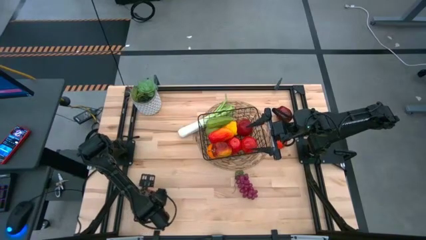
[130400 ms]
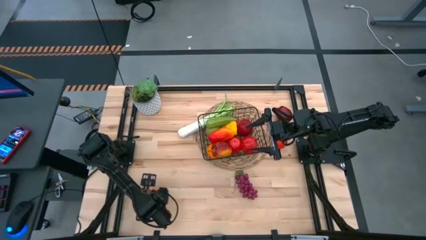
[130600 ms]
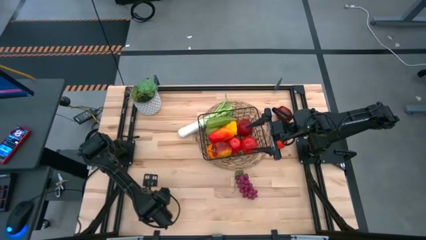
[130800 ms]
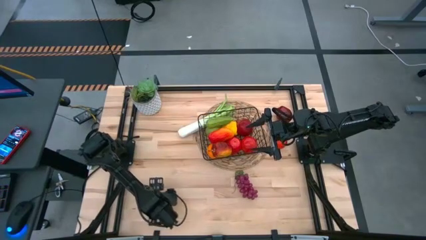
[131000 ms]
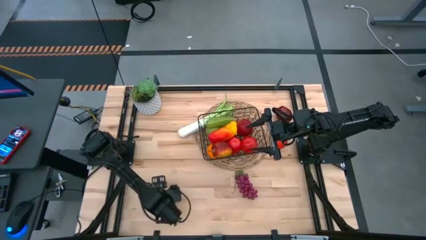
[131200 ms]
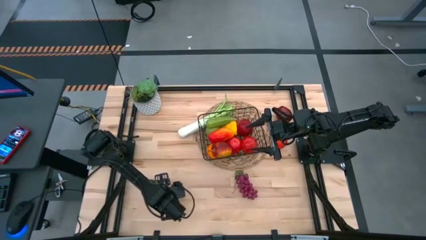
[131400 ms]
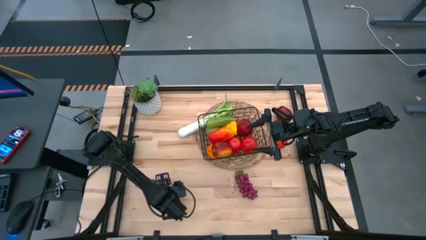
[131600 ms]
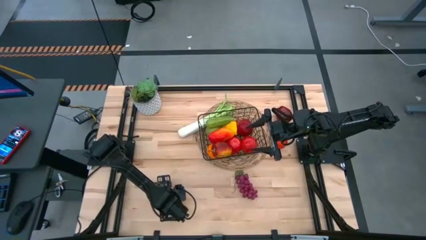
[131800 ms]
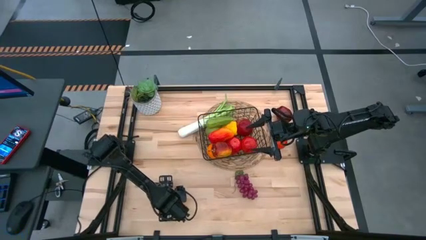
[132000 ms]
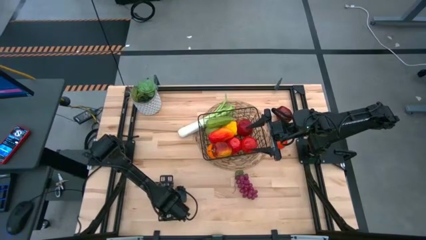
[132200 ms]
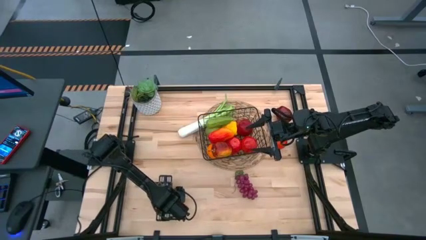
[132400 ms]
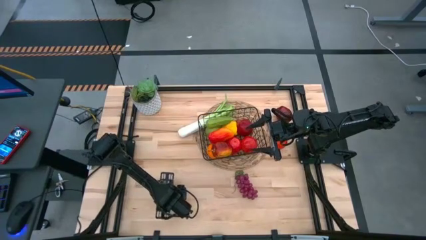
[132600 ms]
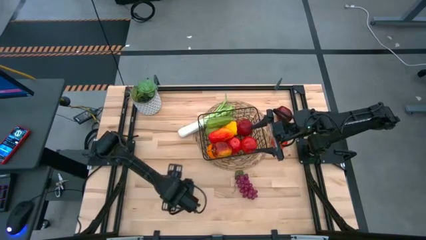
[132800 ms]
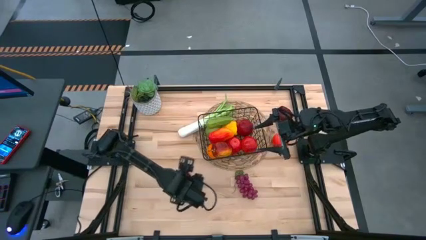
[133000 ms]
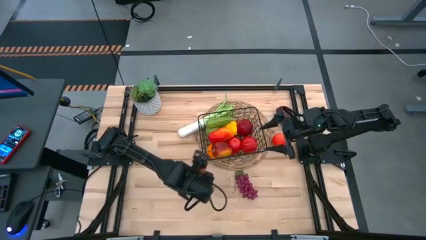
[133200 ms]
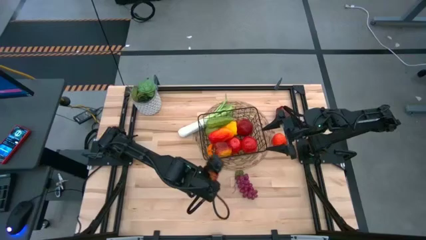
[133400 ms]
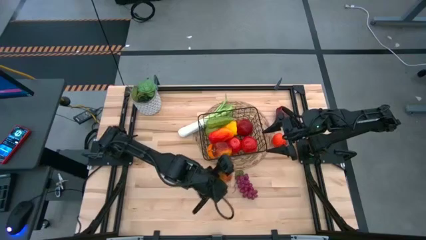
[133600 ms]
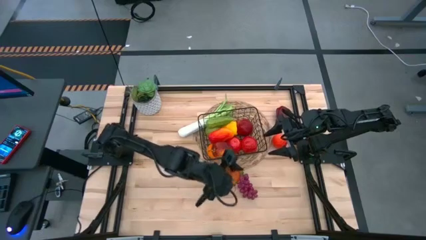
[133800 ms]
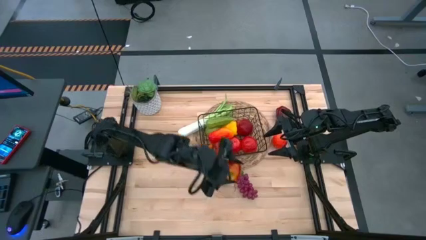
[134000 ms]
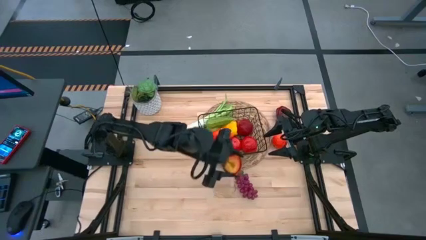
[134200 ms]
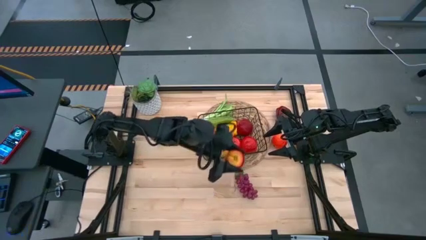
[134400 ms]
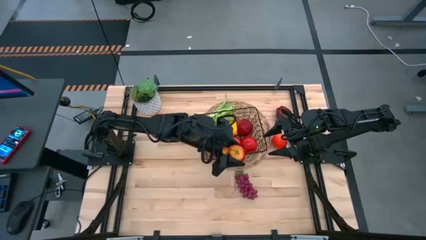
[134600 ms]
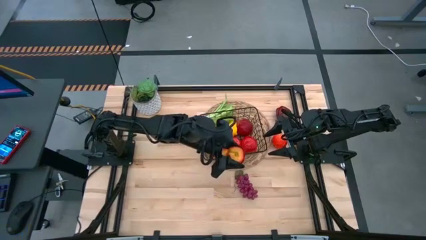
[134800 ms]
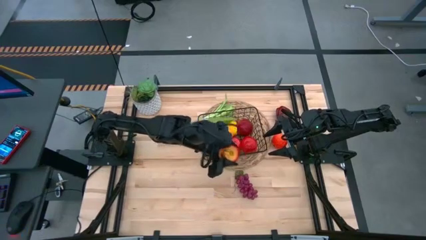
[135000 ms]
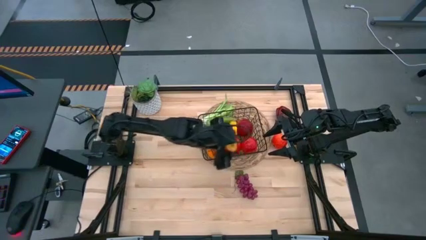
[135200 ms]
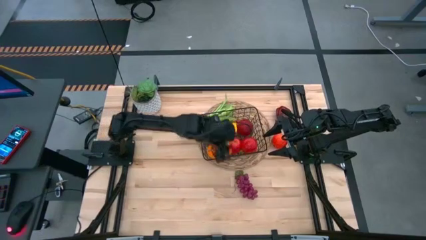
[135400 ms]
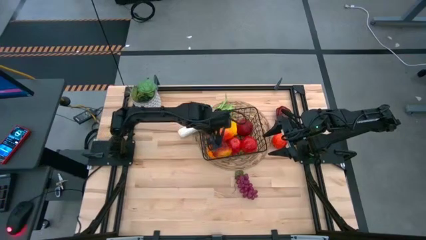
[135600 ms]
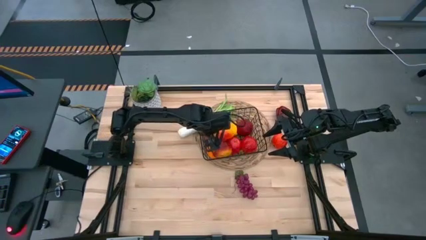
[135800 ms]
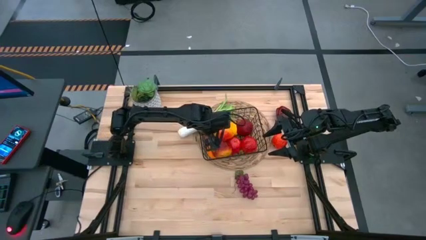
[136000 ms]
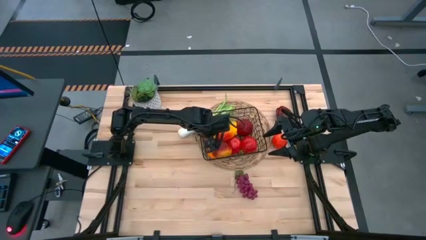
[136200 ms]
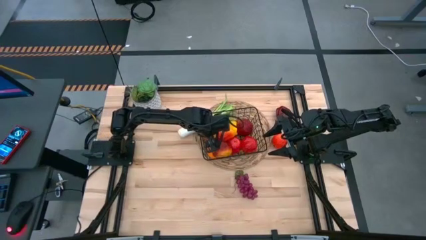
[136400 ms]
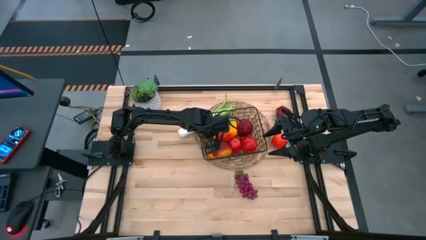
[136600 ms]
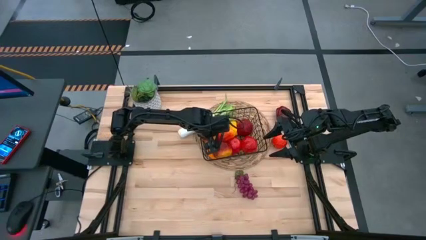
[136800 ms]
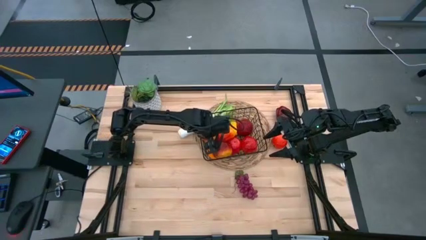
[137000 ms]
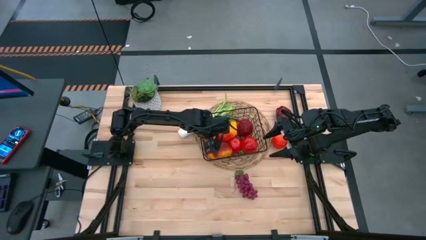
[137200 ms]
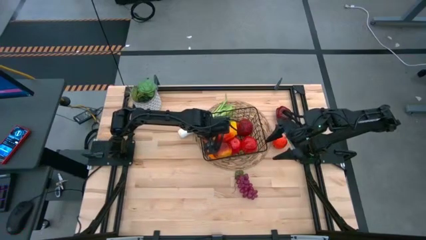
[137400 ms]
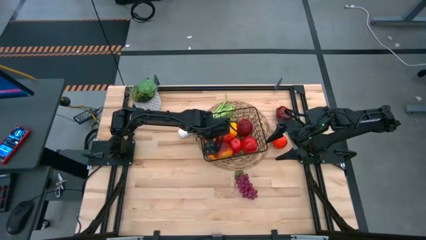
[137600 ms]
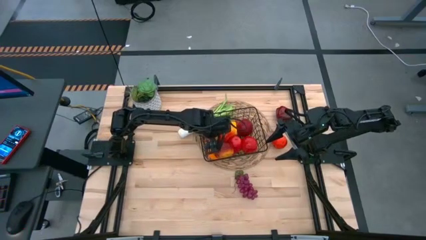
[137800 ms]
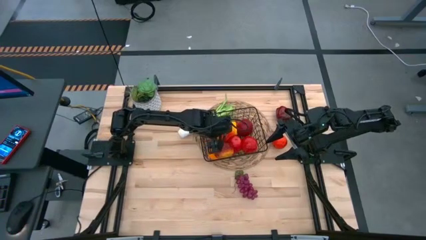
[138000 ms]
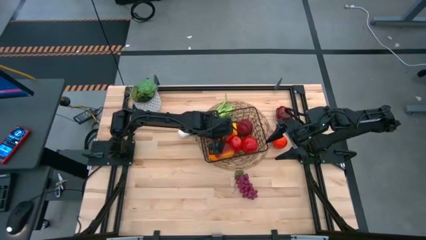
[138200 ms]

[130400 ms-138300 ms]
Task: Build produce basket
Put the apple into the wire basket

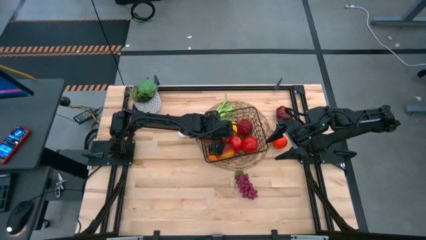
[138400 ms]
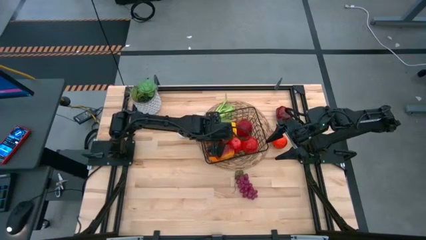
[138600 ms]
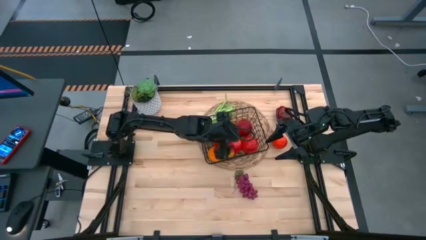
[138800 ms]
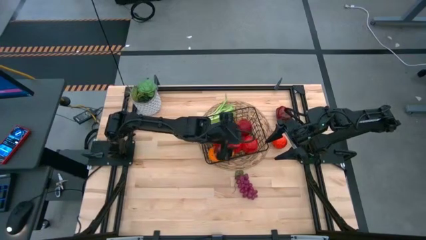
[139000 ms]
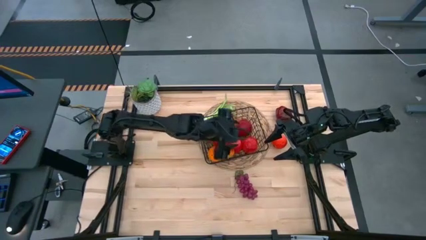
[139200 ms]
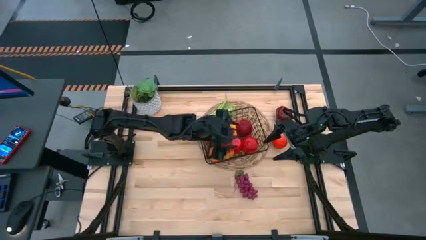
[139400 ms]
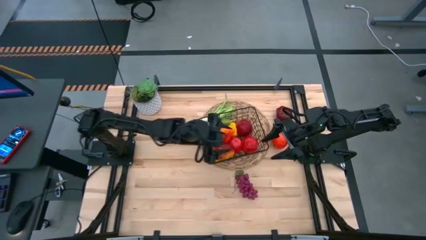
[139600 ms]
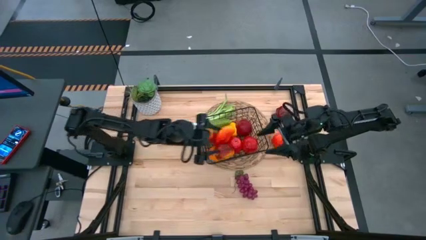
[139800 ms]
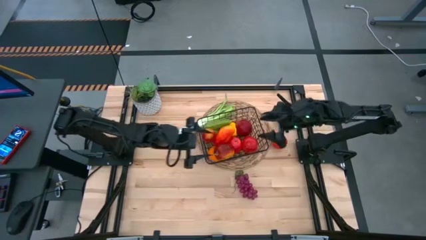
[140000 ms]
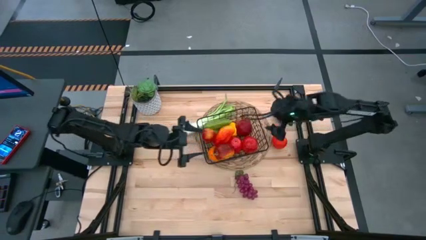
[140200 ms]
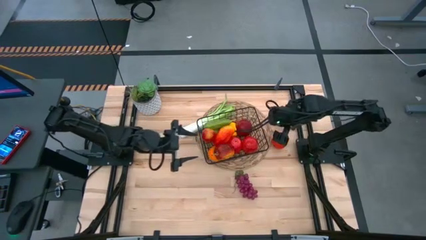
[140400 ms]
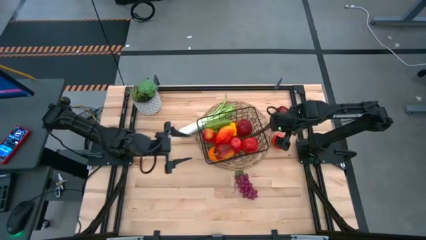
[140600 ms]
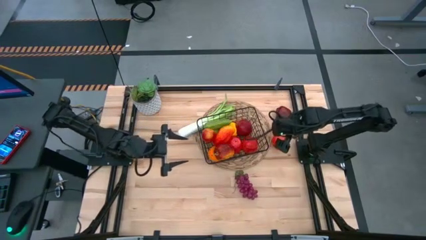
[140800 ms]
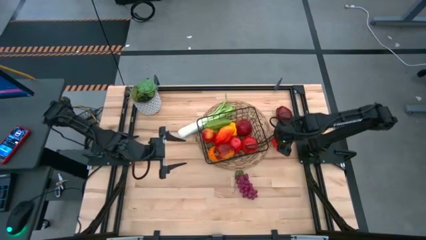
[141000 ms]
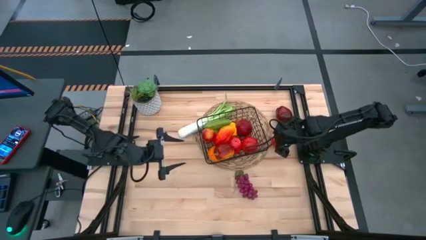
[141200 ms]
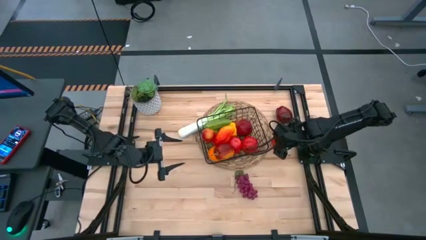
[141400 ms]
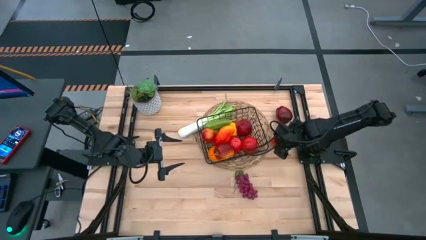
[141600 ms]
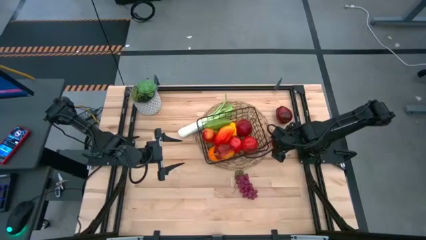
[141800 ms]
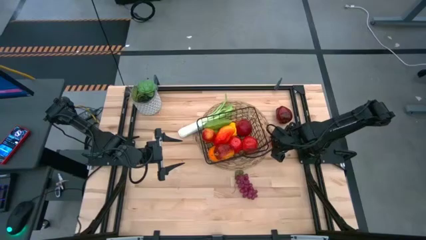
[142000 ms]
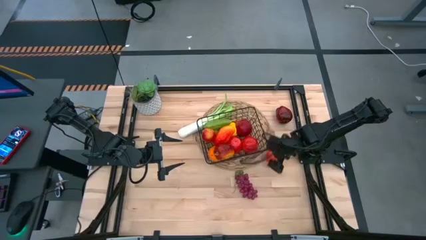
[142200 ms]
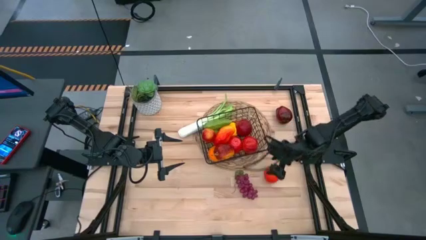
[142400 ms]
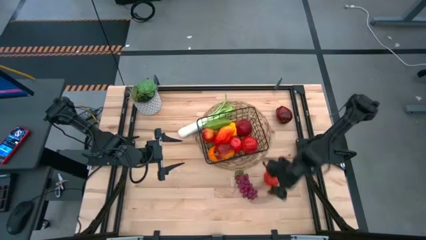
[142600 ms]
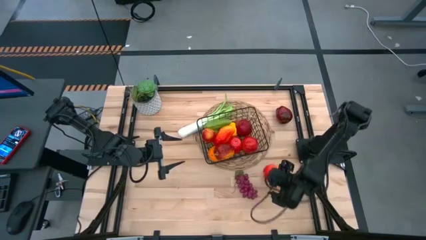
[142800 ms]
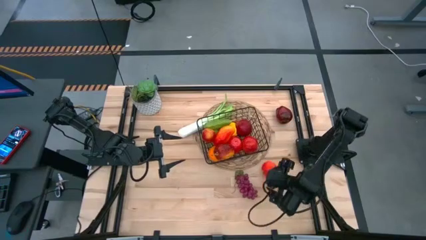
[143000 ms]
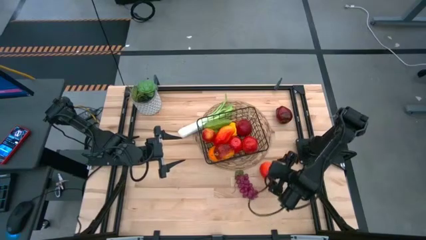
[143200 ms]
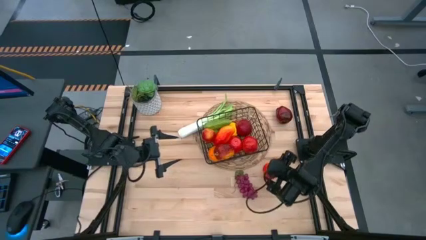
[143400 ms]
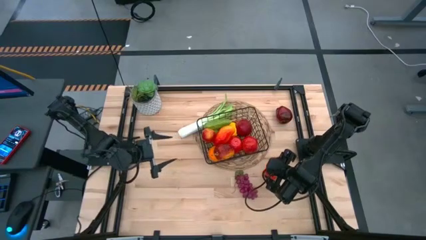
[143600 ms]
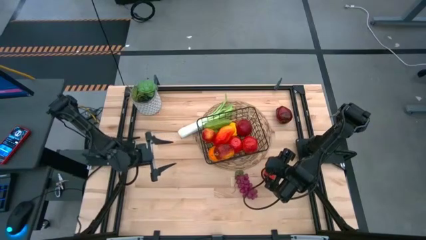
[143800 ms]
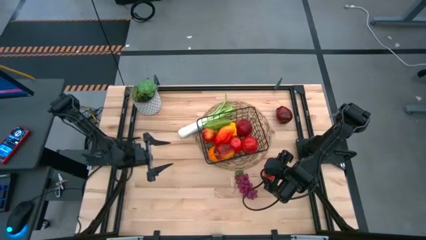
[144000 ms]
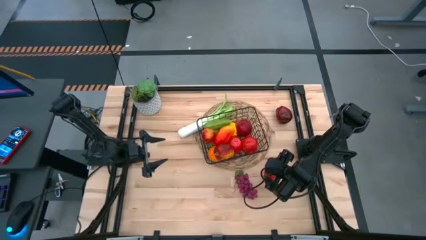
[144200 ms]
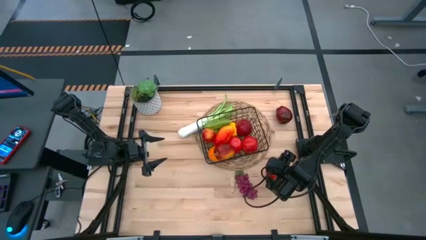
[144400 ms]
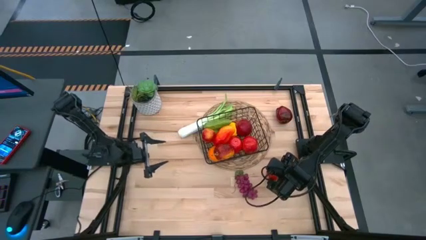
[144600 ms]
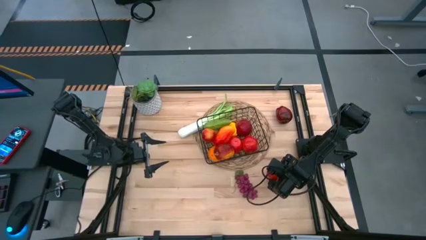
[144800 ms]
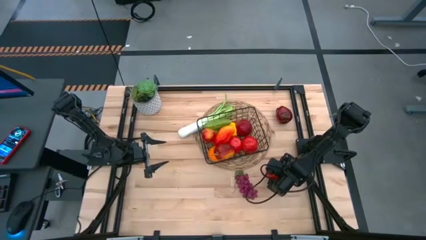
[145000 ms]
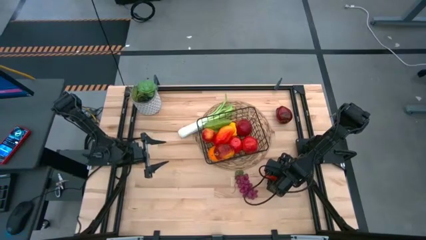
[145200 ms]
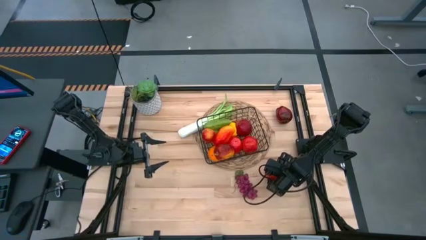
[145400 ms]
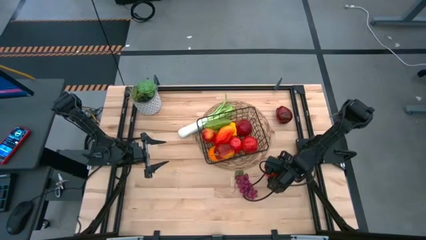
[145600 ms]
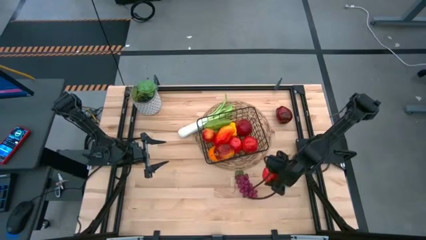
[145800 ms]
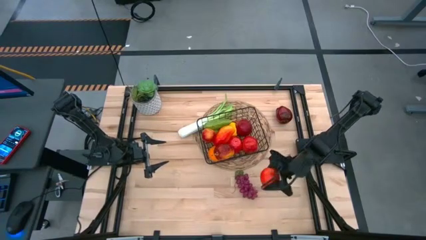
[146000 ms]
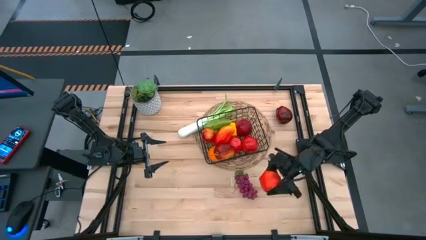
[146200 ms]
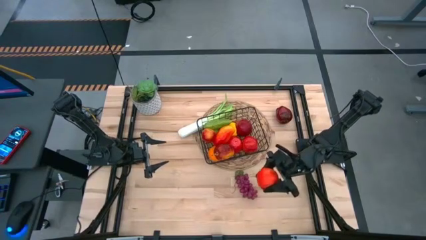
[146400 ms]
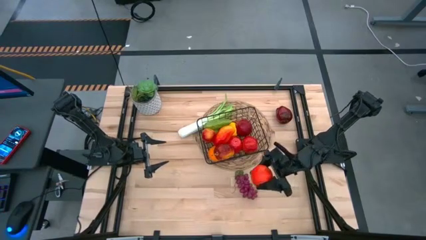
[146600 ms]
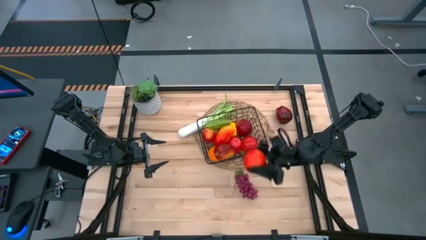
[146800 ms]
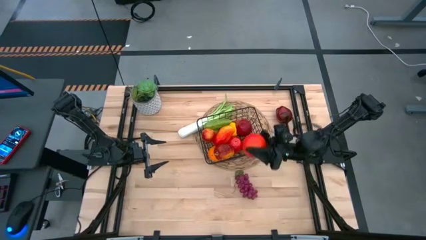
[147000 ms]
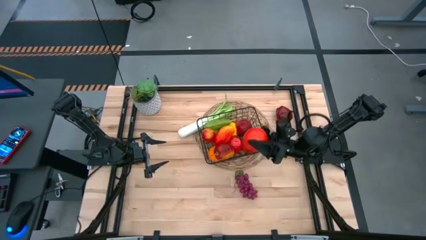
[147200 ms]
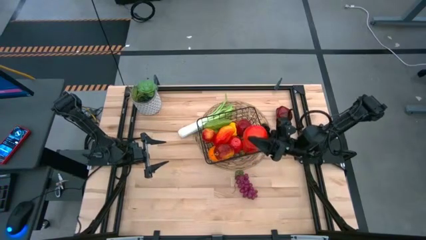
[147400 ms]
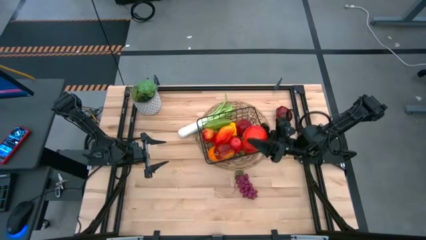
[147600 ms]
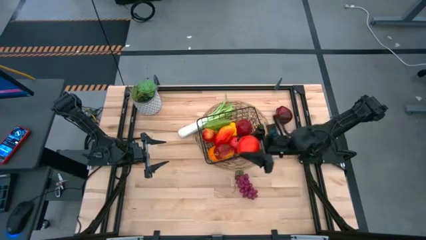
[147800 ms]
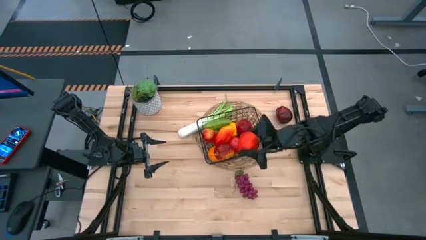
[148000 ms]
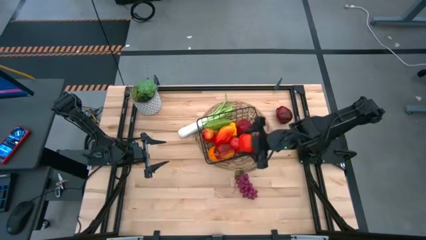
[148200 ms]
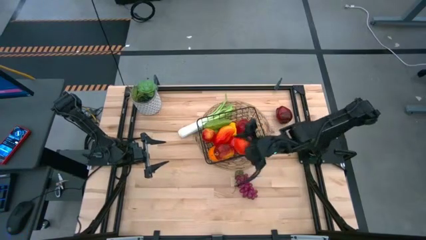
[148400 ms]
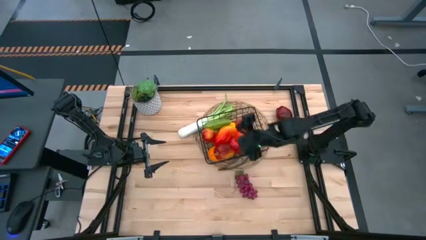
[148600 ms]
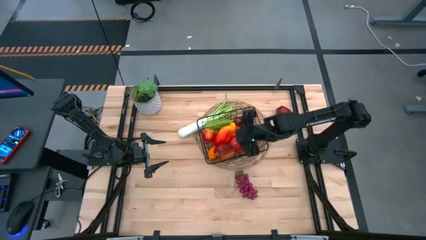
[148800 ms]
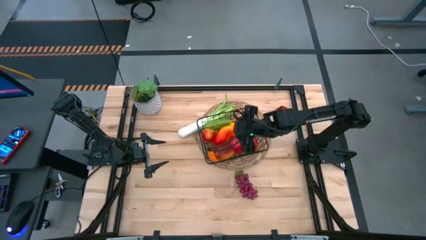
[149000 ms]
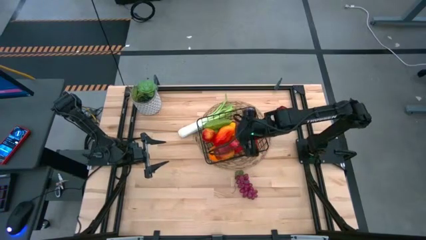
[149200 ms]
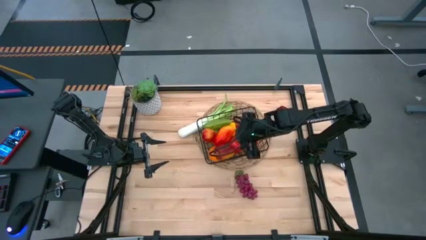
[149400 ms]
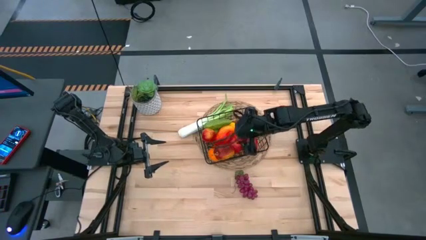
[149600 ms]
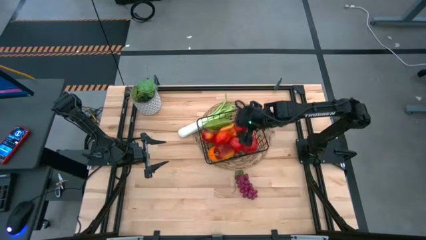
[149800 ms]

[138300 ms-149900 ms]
Put the apple into the wire basket
